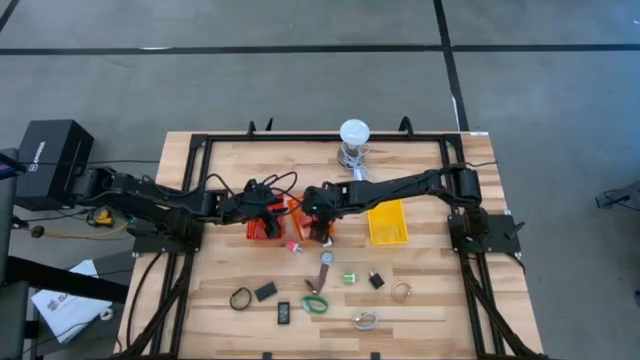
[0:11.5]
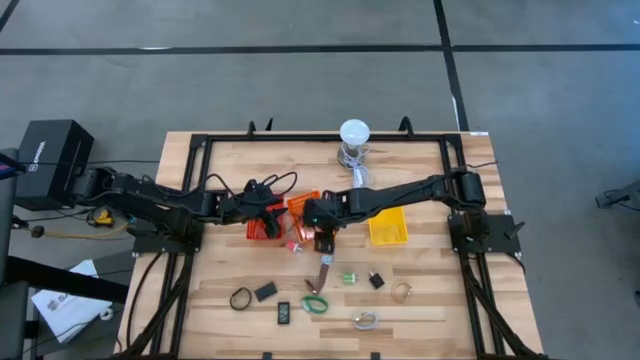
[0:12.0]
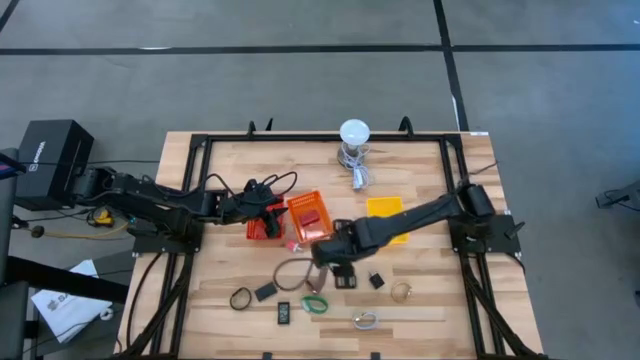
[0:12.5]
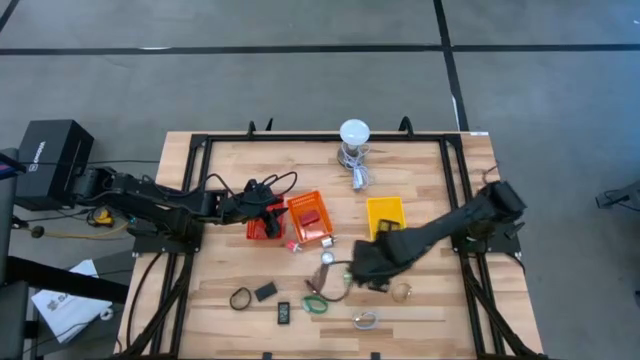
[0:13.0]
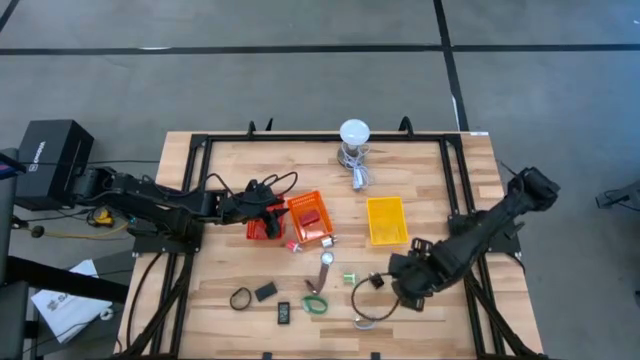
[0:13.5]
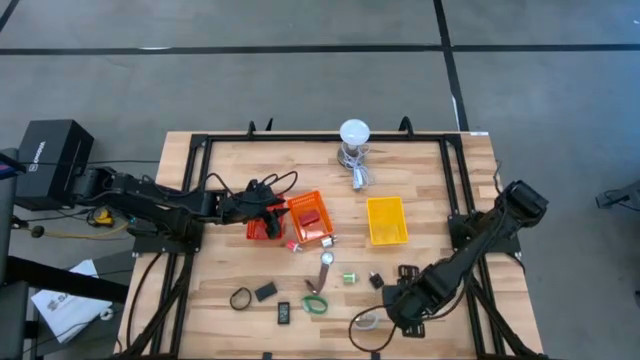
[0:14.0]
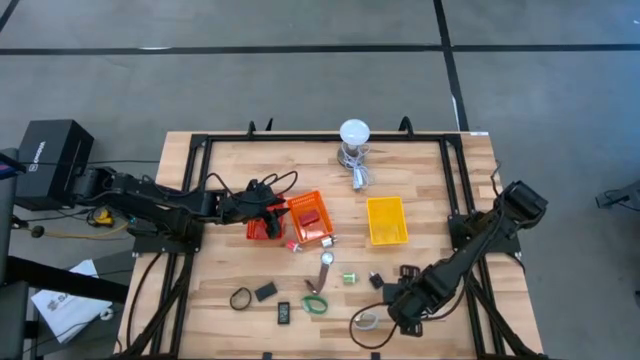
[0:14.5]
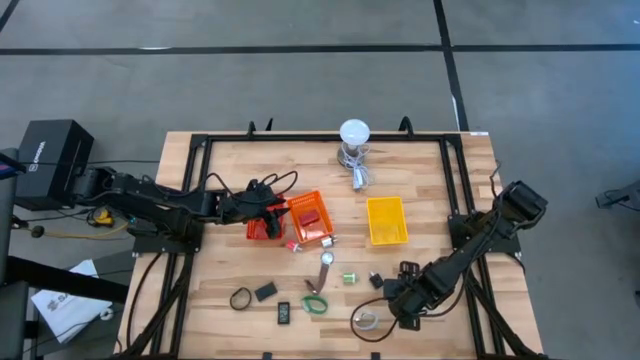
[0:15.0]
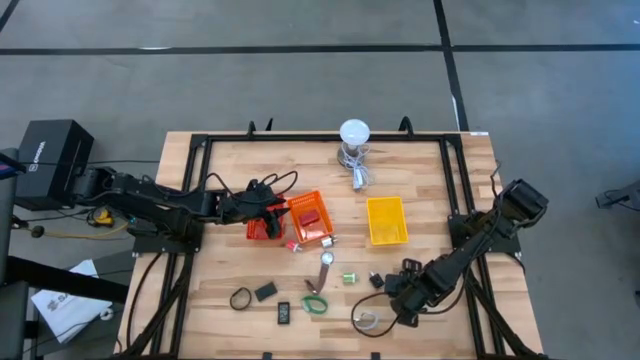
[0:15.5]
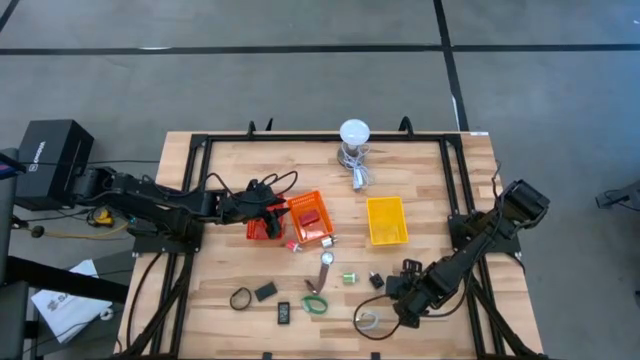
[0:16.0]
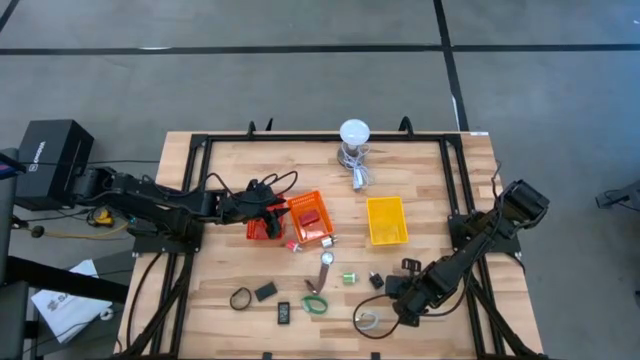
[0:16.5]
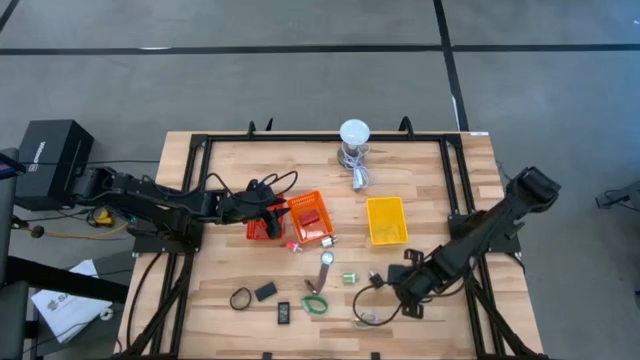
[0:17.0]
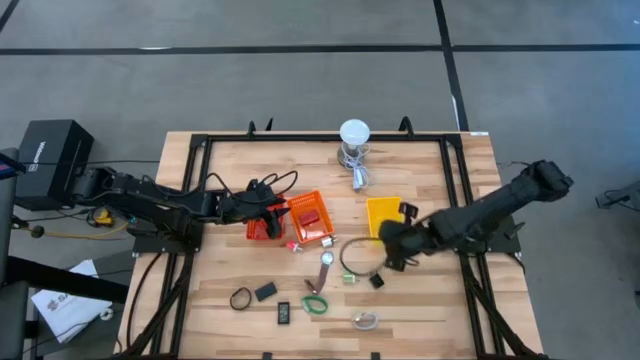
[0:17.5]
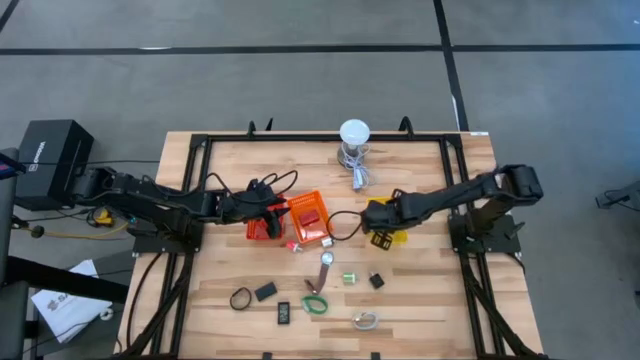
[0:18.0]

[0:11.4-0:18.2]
Task: Pick & Place Office items
Put the gold wrist watch into the yellow bin

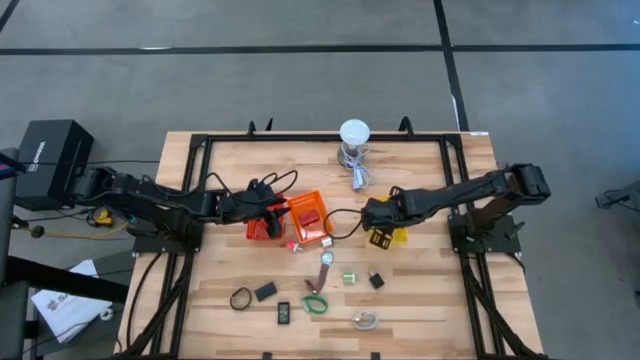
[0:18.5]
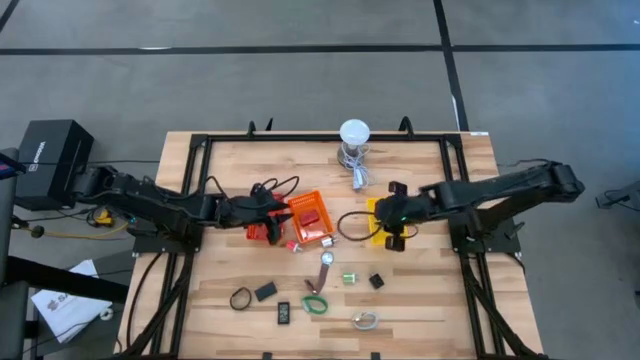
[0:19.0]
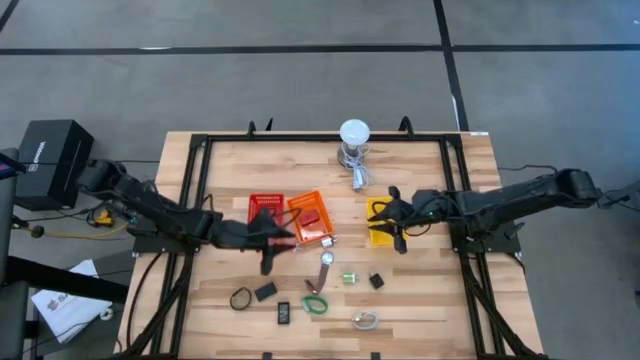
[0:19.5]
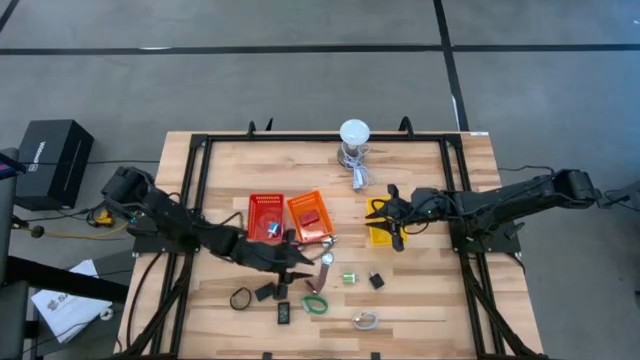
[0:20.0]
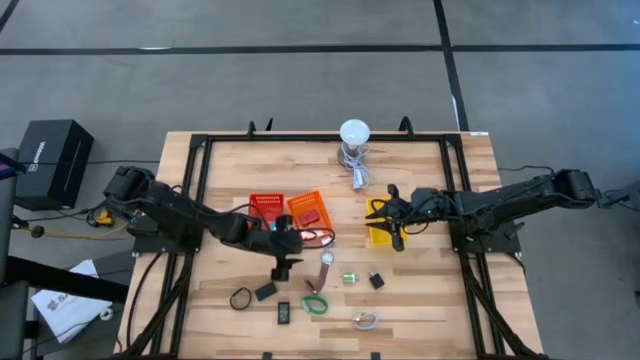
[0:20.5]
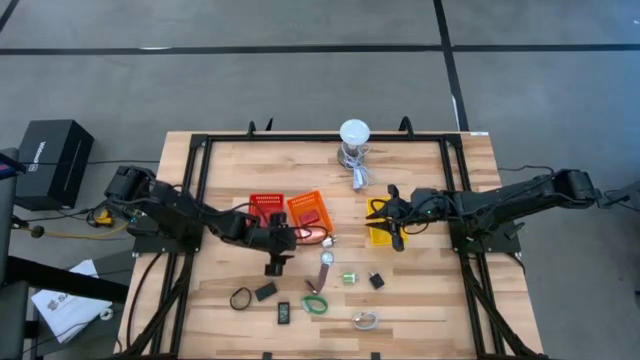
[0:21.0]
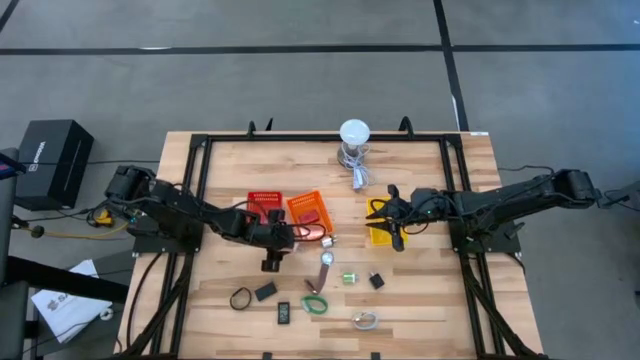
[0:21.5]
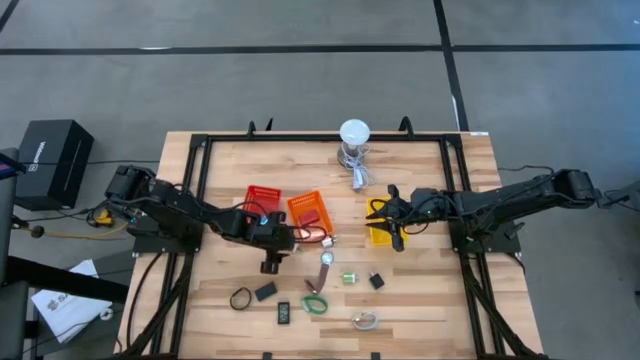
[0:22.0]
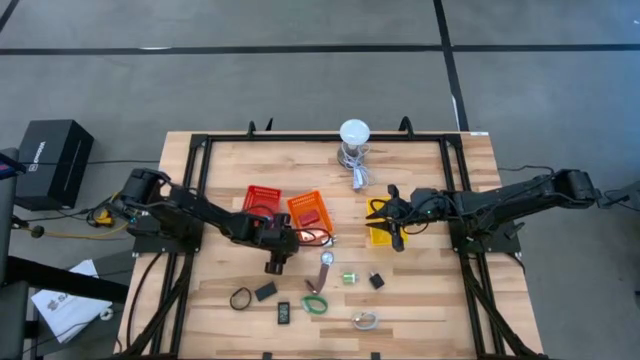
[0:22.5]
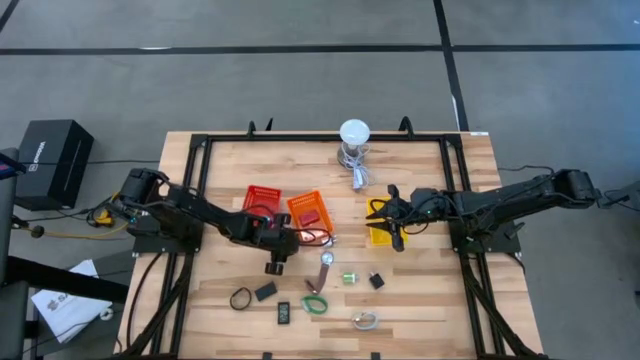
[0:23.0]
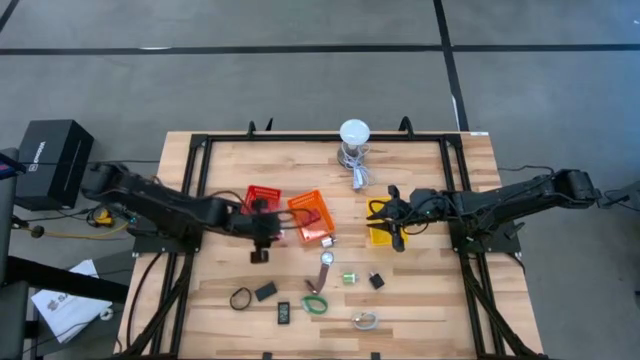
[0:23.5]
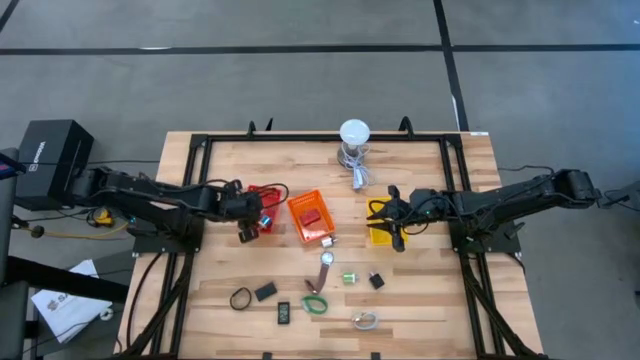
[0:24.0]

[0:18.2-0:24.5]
Put the pink charger adapter into the red bin

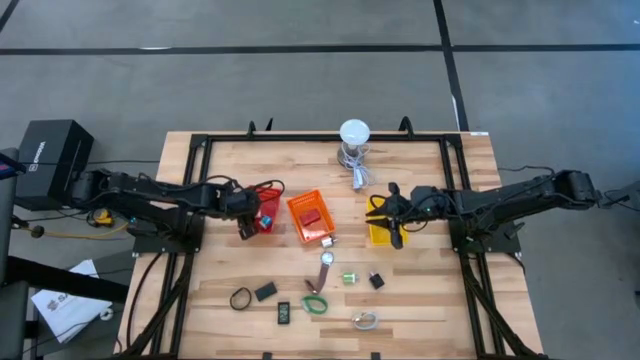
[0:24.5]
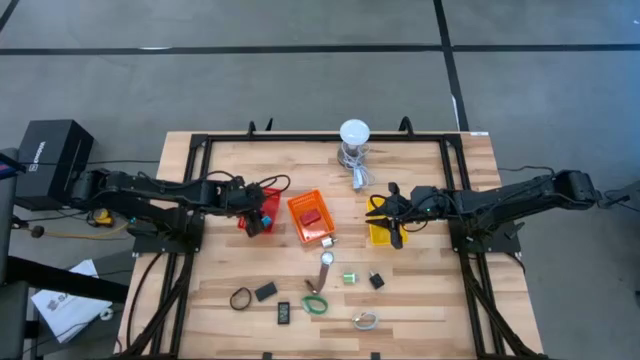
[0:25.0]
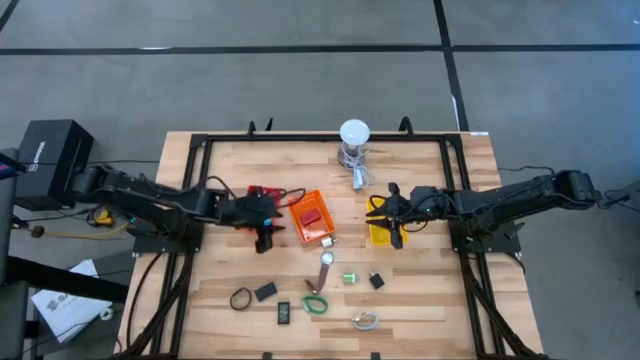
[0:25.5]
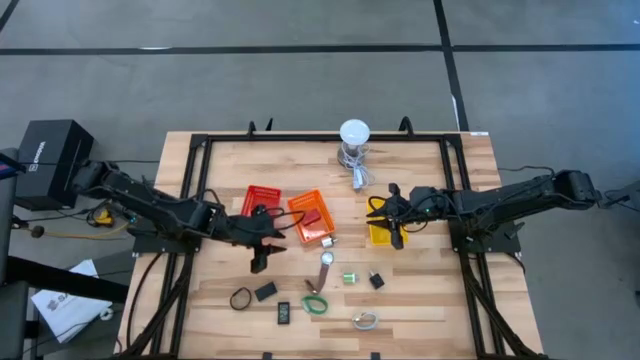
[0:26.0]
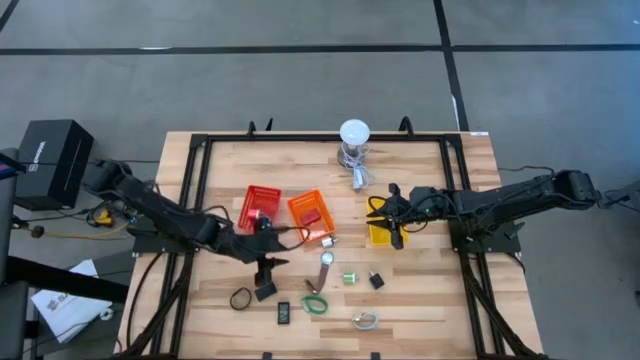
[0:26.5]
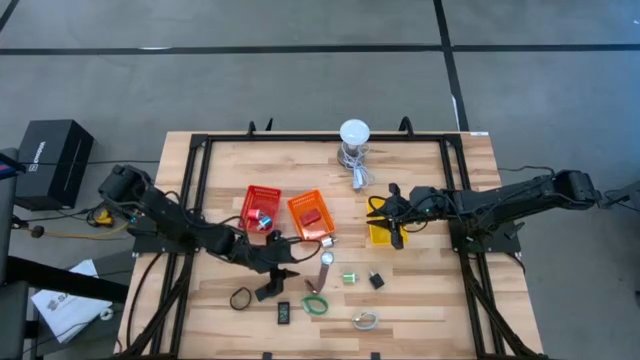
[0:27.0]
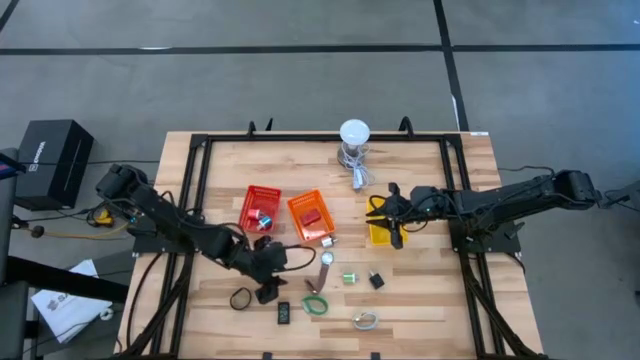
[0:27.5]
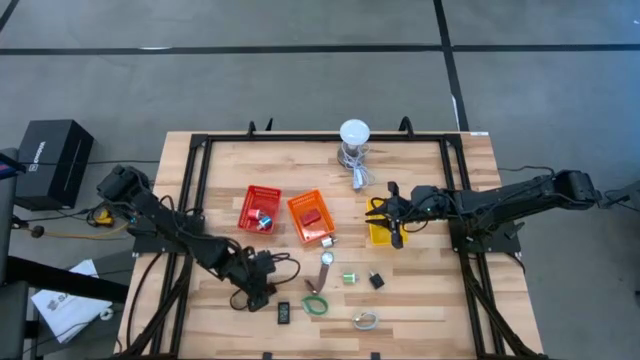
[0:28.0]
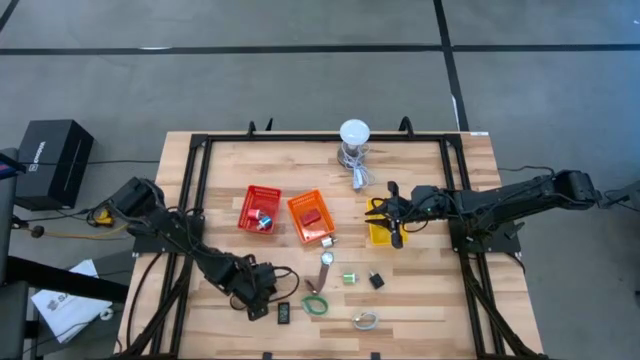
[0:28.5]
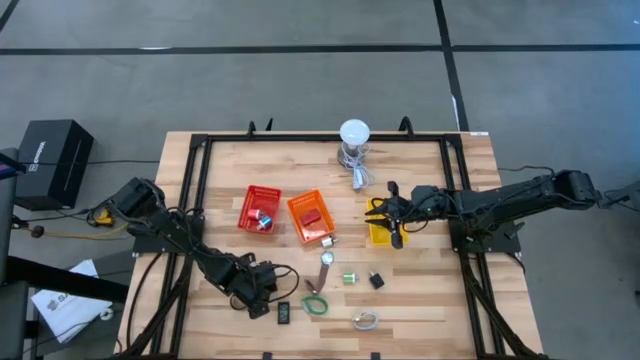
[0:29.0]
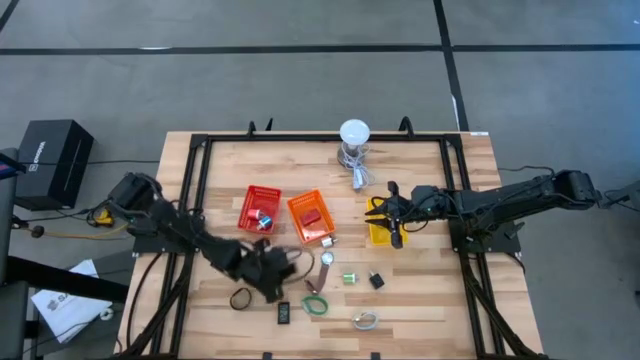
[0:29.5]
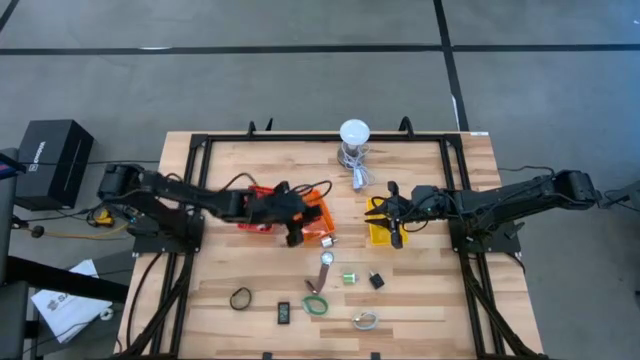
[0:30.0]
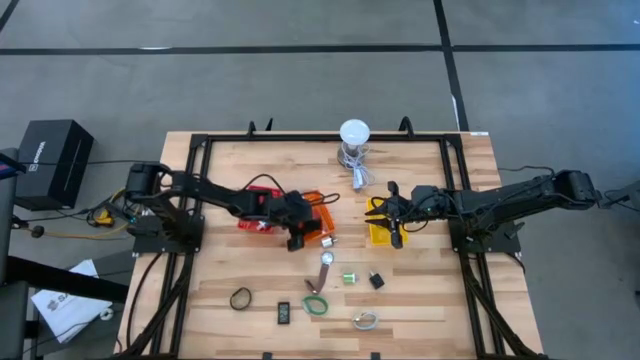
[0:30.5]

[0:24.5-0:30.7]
Put the top black digital clock into the orange bin
